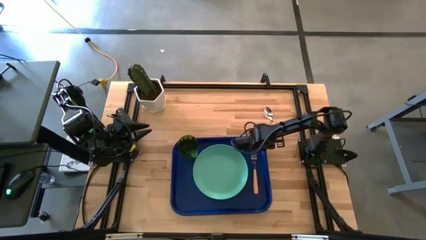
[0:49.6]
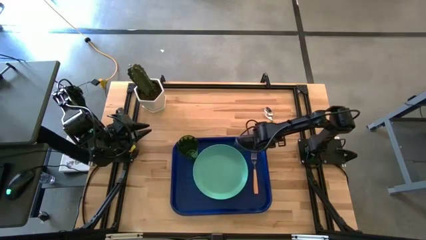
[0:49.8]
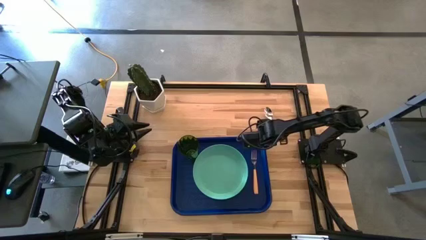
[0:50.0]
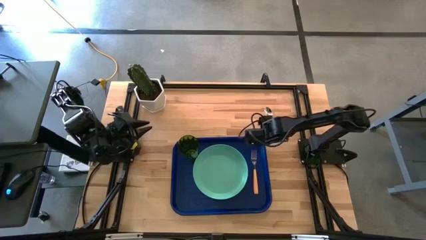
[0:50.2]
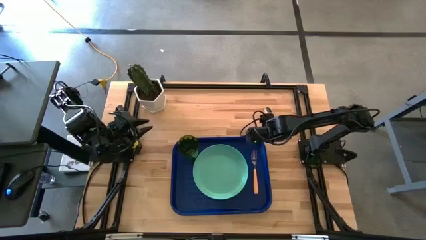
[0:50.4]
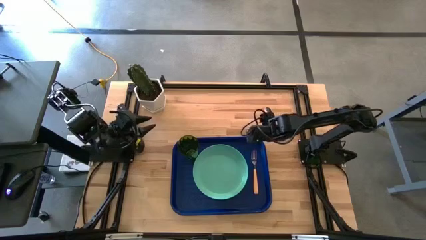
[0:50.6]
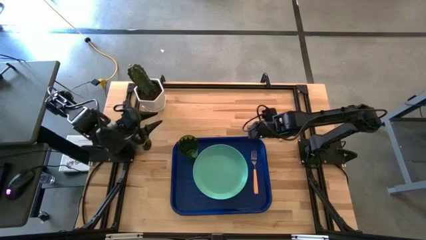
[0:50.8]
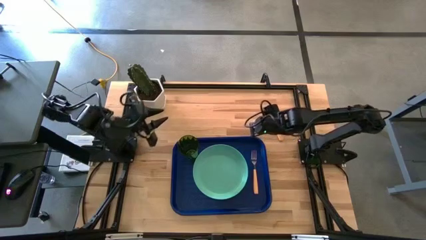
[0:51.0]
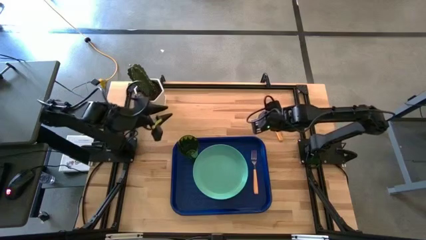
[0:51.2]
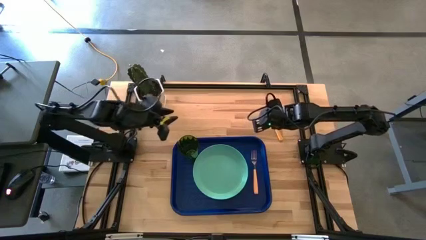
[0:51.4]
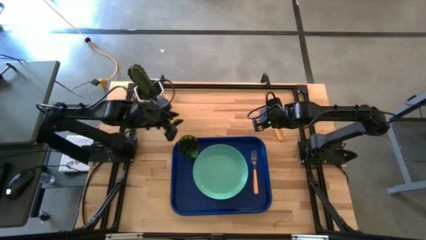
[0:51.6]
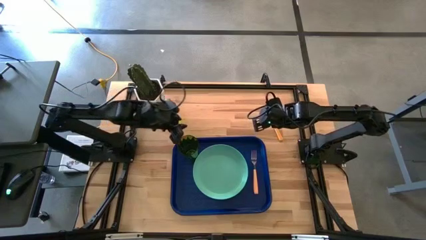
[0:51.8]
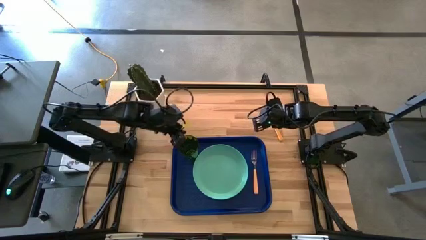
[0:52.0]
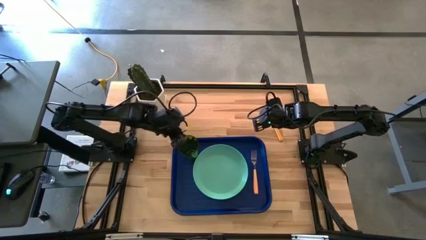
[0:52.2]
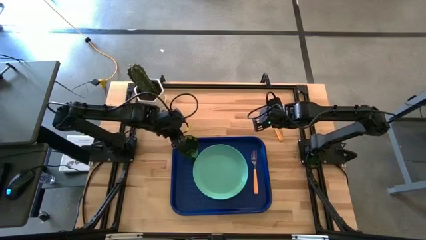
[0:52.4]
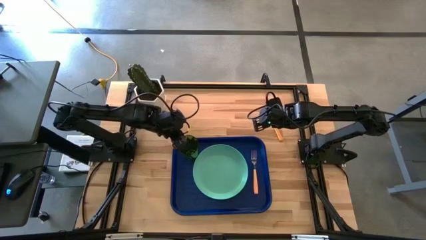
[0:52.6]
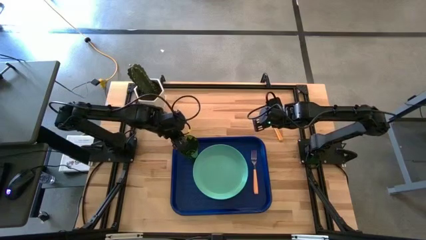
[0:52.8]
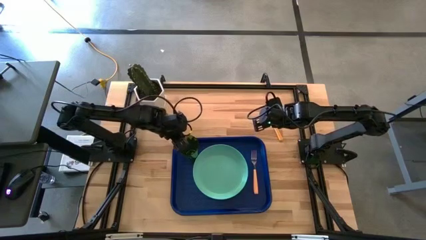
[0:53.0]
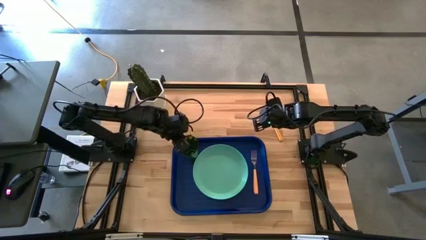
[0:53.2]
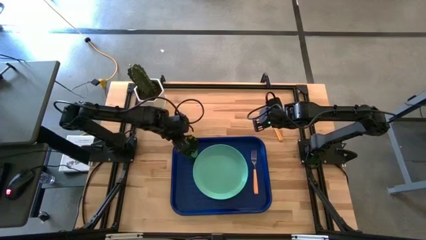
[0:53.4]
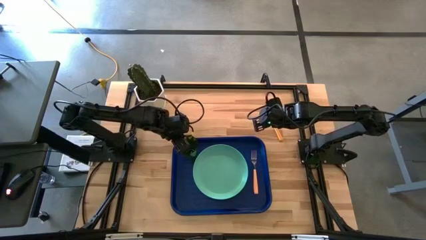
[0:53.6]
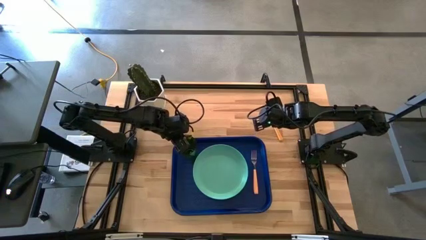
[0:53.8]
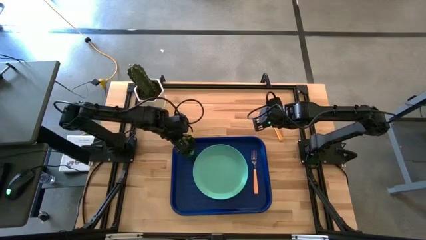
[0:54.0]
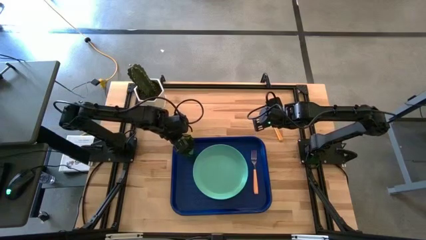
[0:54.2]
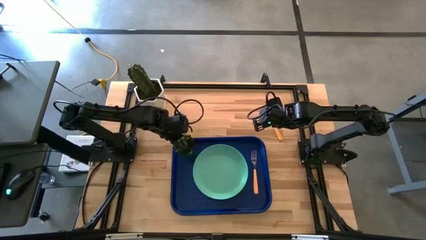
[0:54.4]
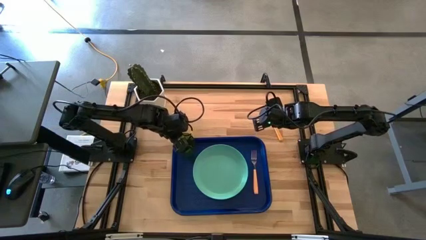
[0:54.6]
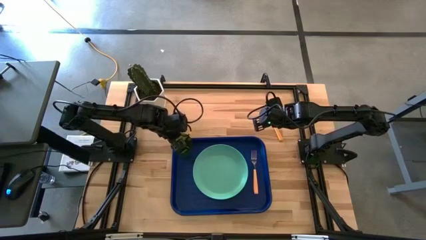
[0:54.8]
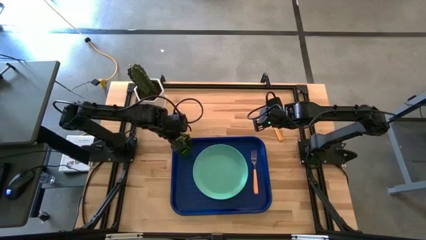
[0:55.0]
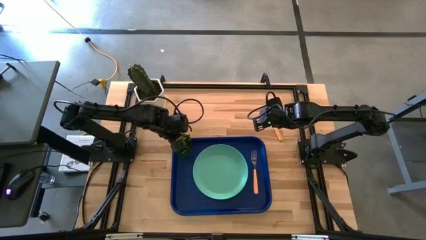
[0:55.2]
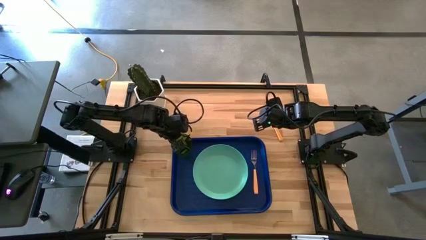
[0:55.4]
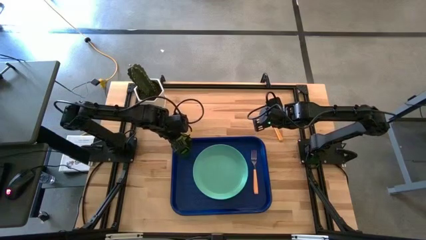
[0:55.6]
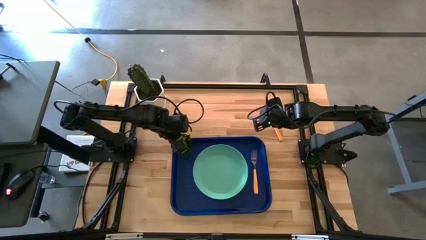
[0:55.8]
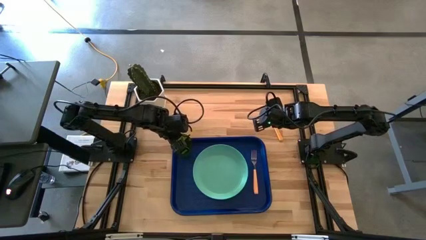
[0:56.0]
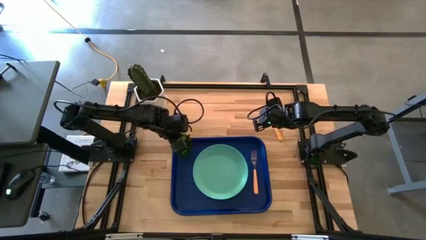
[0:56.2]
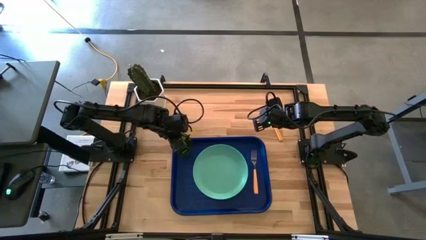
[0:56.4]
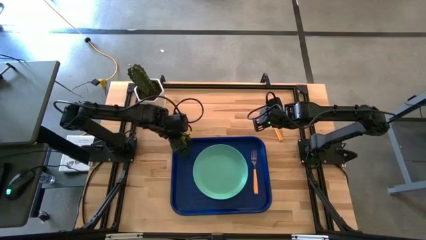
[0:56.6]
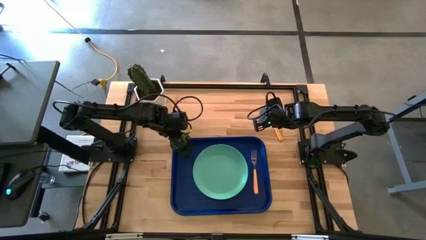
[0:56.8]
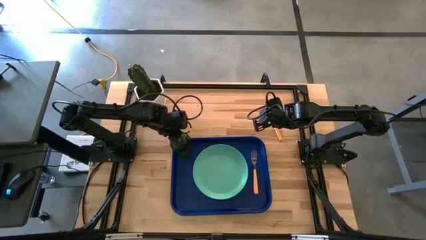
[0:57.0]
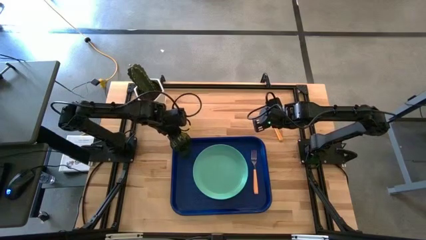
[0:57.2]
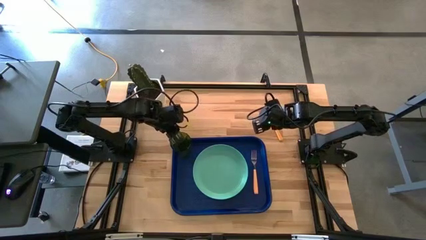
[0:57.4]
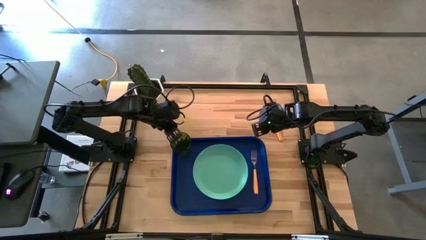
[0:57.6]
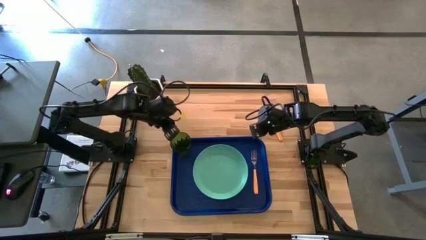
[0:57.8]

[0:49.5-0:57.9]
Task: Pick and place plate/cup/fork/spoon on tray
Adjust the green cup on the blue tray

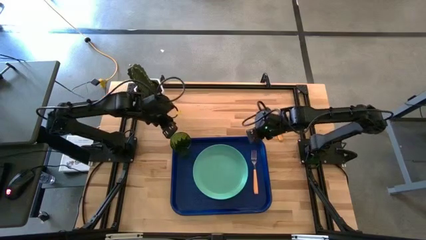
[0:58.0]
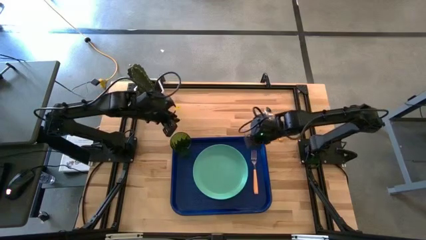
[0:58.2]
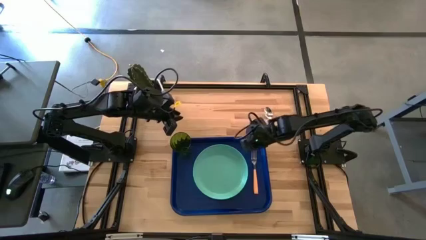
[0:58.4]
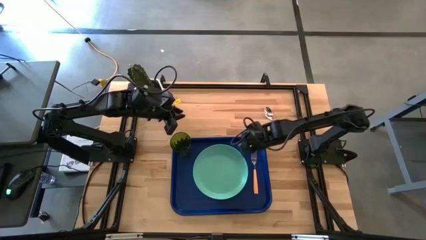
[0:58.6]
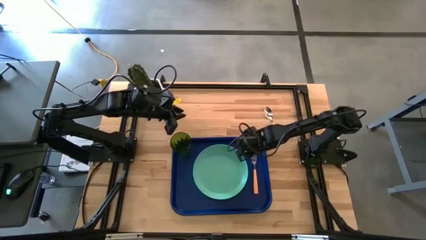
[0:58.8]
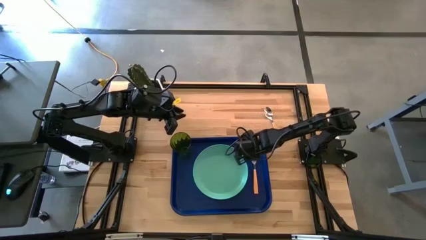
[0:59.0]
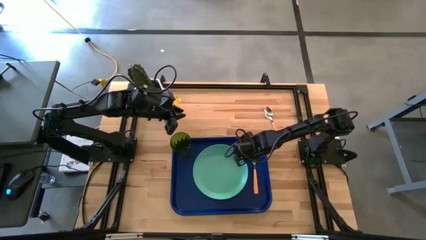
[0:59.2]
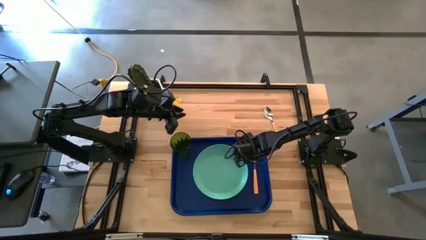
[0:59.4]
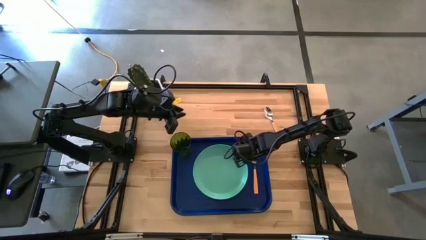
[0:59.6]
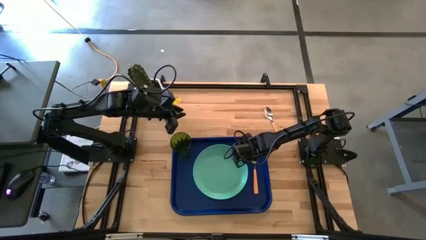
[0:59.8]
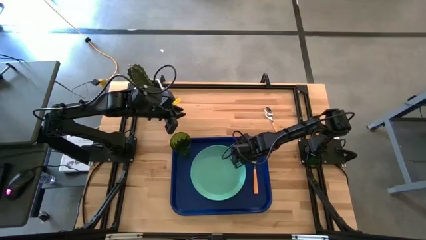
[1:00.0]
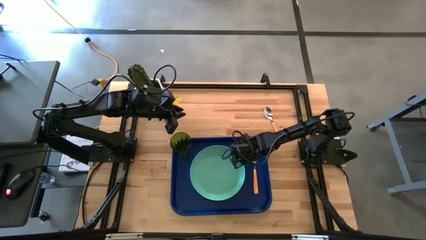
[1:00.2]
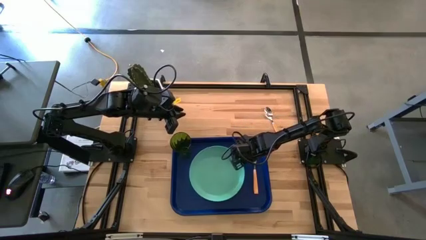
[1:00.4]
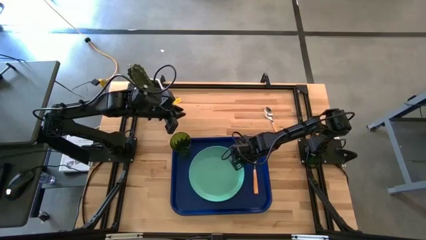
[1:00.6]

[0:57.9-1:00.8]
Adjust the green plate on the blue tray
